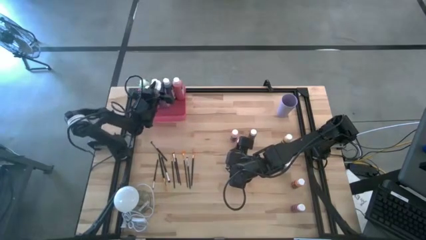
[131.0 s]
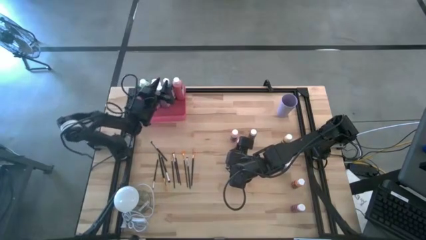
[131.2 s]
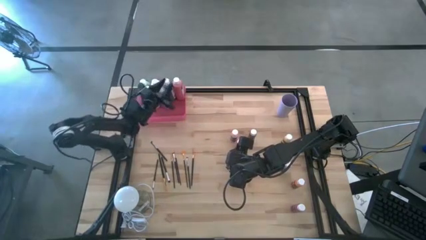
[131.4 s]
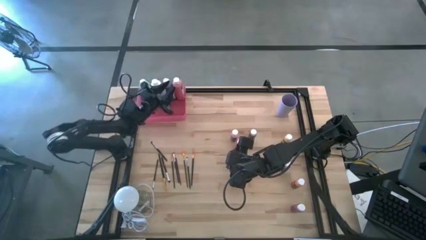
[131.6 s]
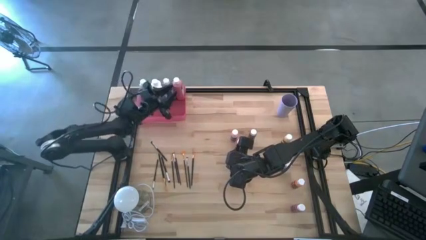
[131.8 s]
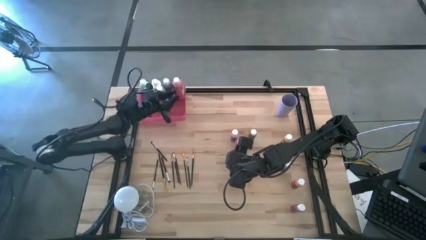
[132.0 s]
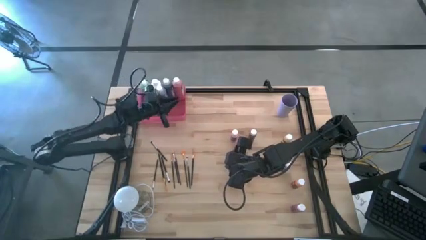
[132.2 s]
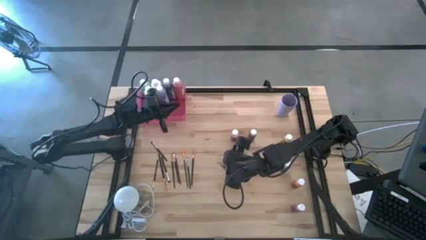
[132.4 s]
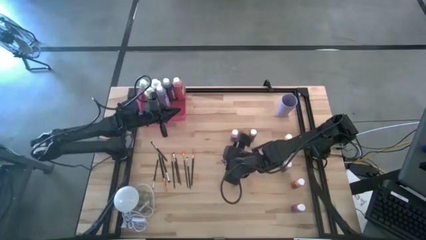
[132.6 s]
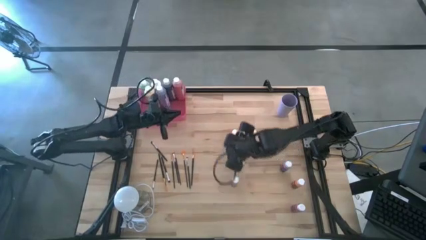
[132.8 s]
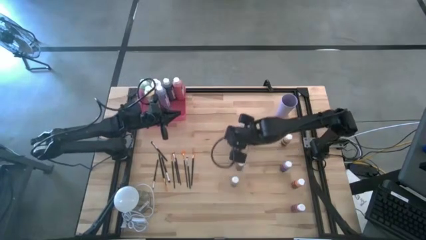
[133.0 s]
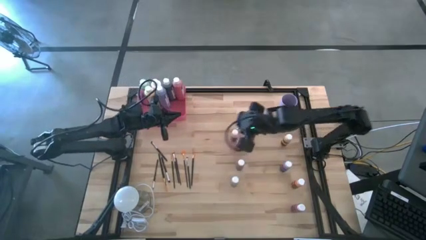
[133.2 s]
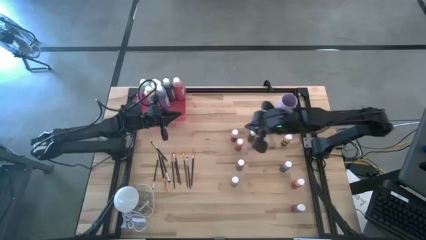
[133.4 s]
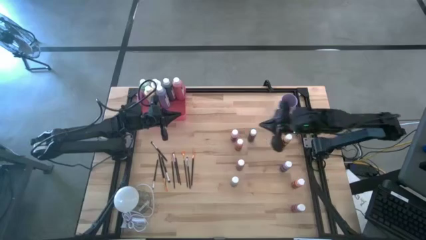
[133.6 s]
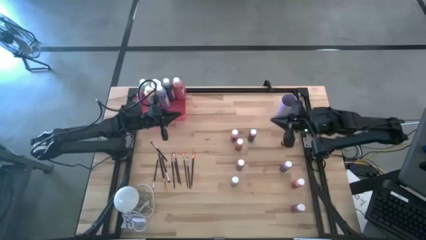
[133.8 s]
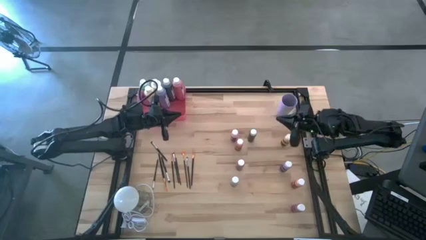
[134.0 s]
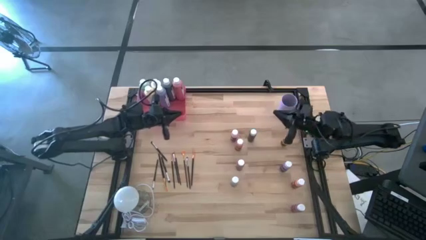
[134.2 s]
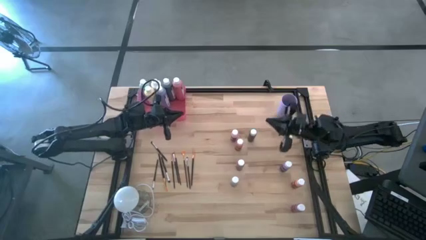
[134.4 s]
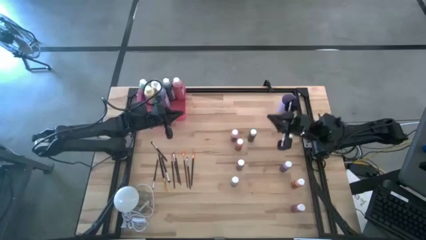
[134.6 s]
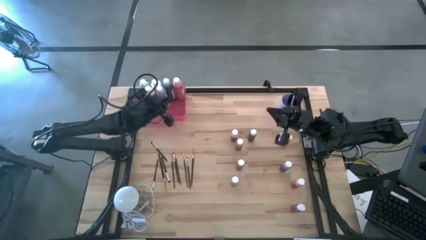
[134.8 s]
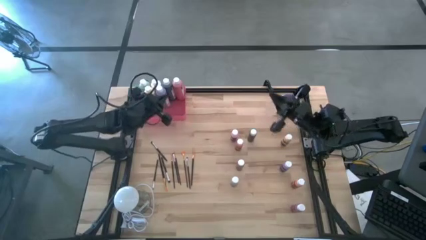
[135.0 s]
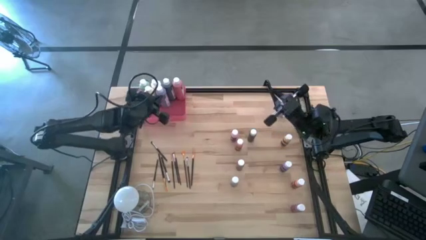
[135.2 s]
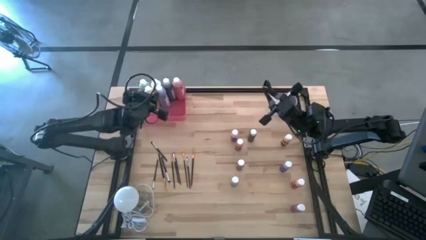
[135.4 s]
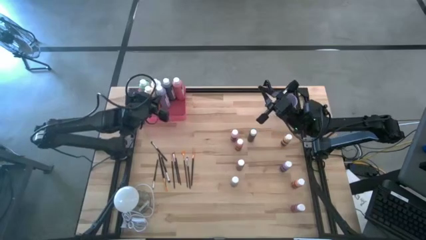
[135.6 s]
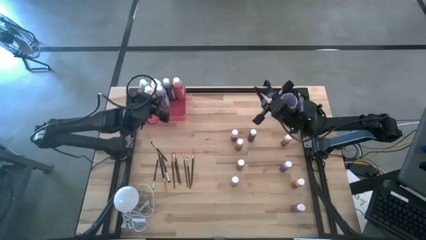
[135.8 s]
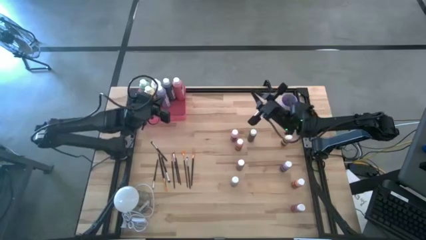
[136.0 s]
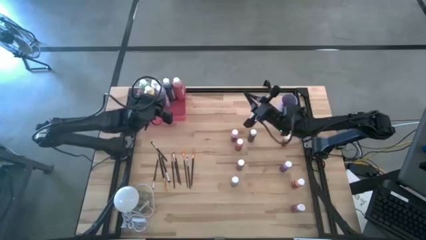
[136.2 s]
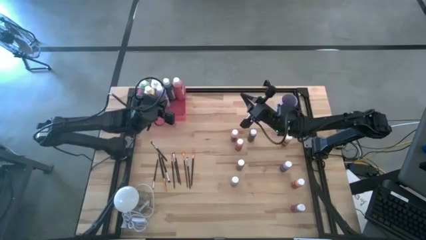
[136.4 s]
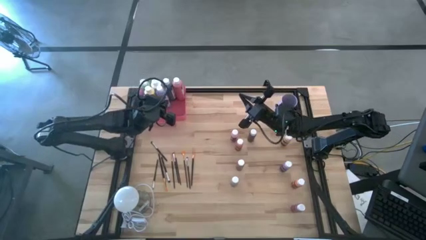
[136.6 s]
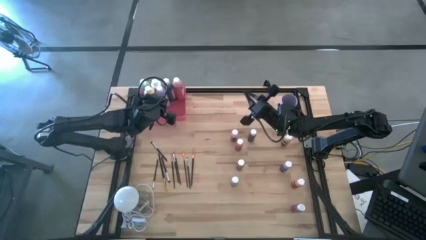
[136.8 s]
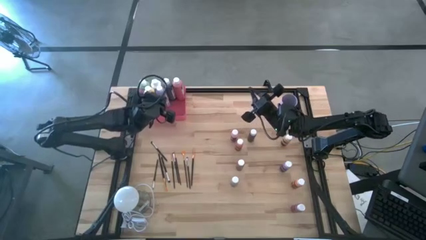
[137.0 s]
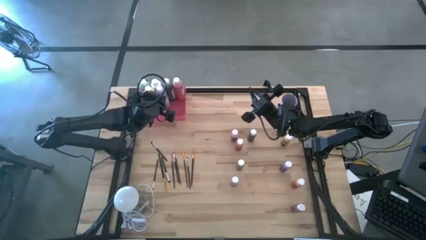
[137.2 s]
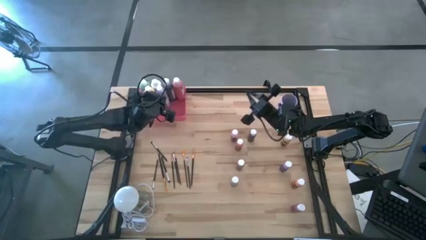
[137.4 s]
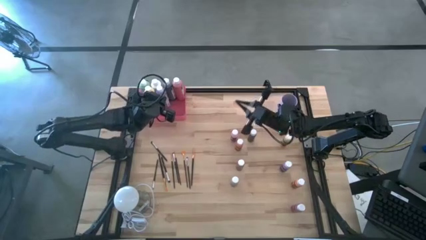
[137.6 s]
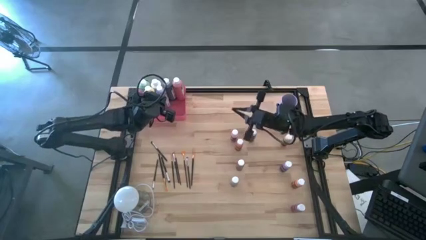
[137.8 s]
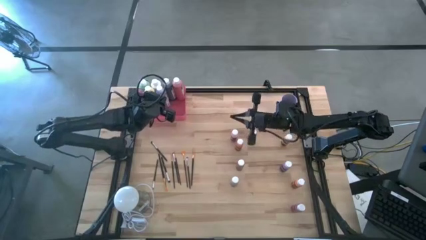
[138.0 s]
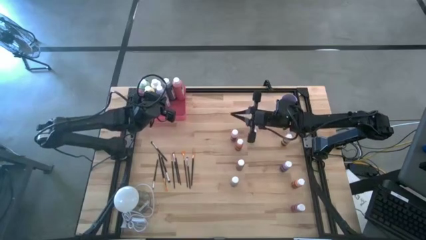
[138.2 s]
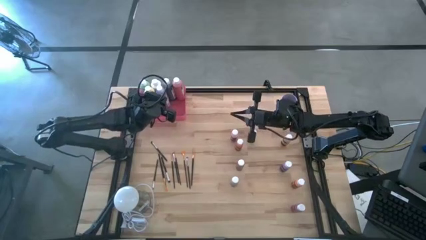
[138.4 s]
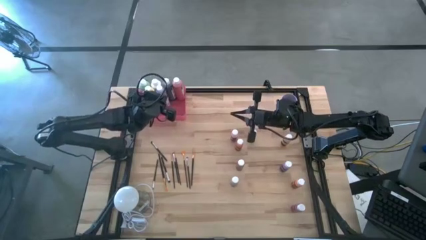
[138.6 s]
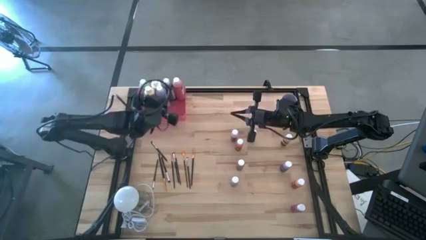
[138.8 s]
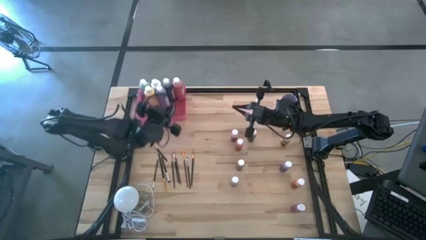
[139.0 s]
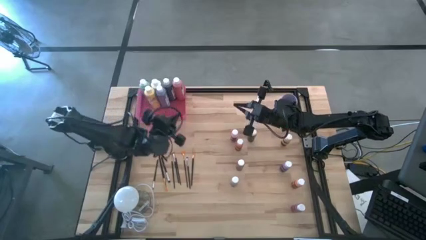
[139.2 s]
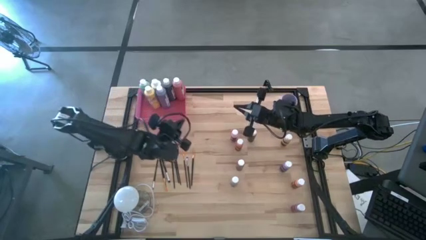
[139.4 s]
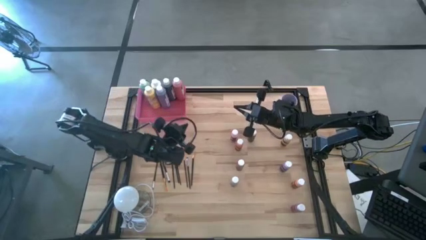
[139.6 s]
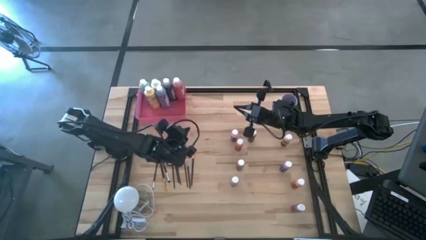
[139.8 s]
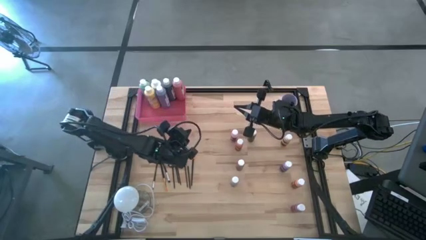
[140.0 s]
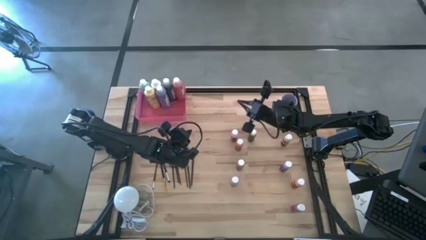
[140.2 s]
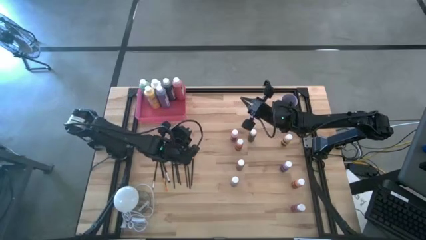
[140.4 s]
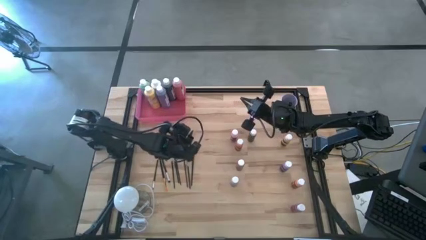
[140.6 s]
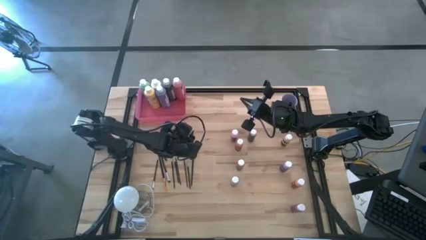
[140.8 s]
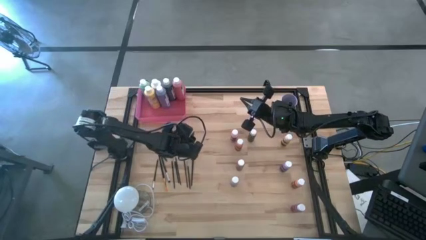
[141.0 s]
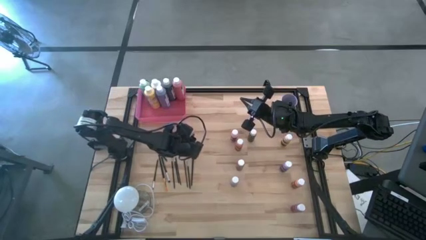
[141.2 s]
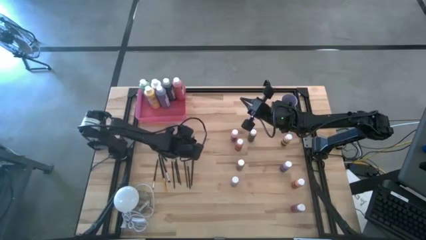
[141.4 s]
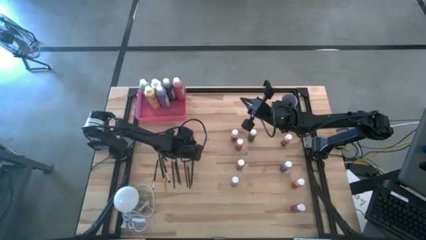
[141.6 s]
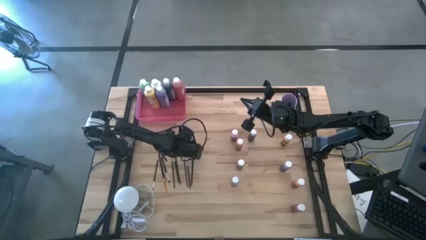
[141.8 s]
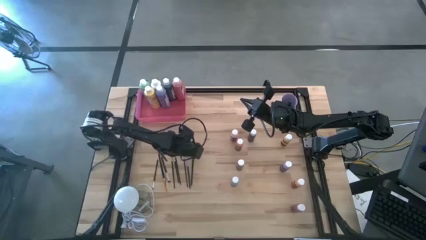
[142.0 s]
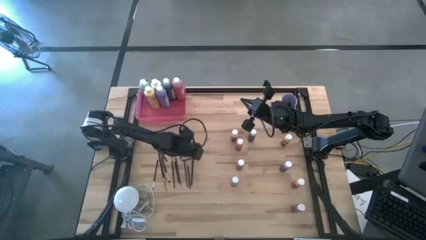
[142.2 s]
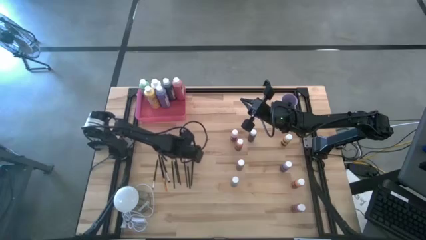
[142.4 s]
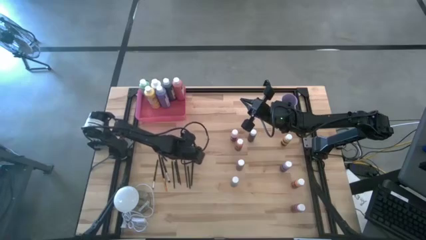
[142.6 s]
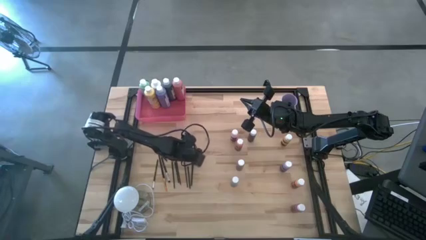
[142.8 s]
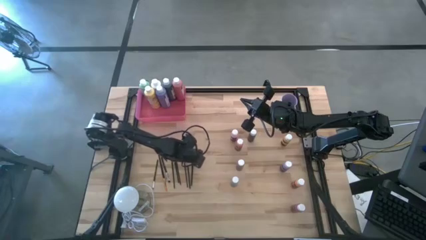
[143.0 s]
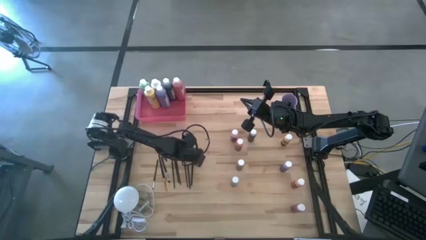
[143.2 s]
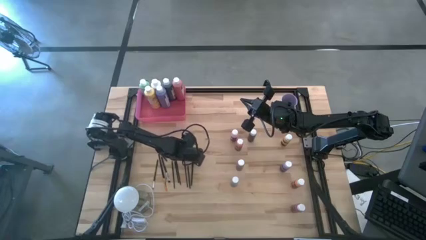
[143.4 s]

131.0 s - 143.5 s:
Task: Pick & Place Paint Supplies
Put the gold paint brush into the purple cup

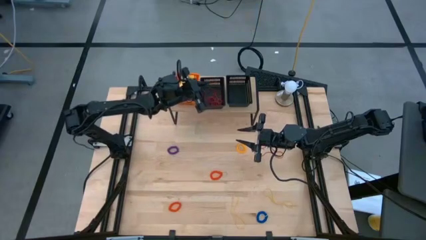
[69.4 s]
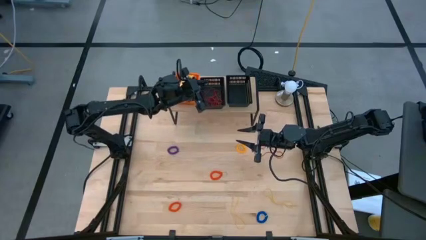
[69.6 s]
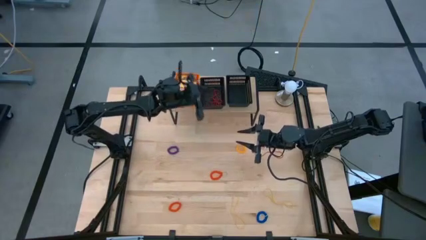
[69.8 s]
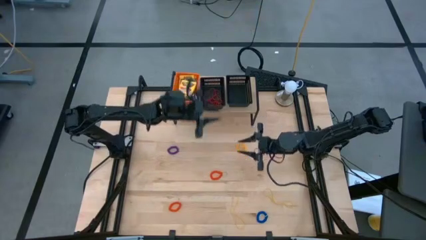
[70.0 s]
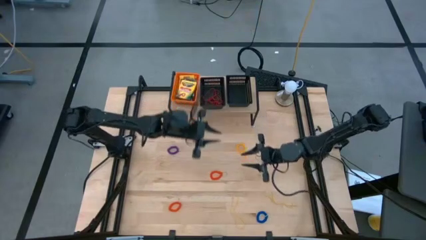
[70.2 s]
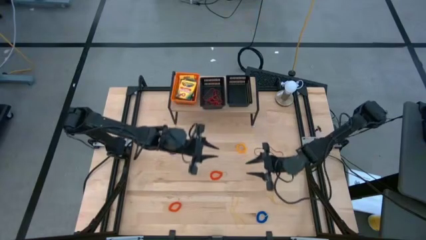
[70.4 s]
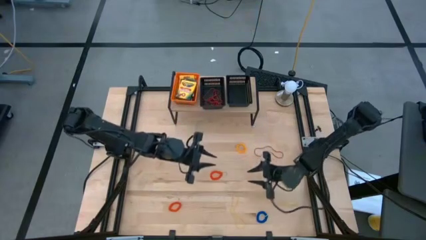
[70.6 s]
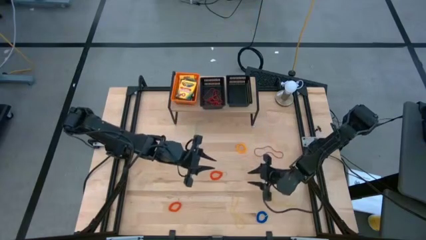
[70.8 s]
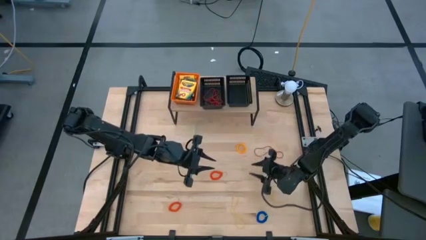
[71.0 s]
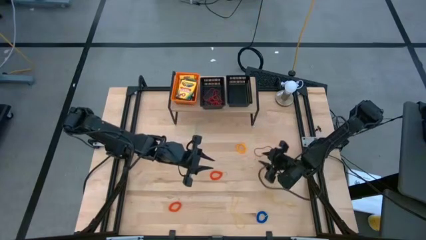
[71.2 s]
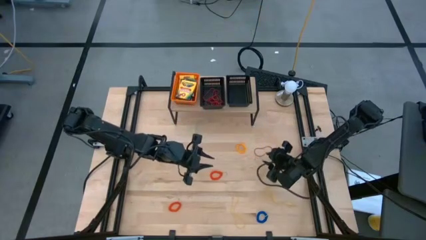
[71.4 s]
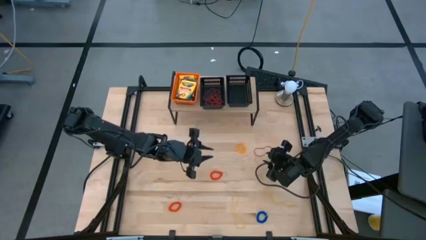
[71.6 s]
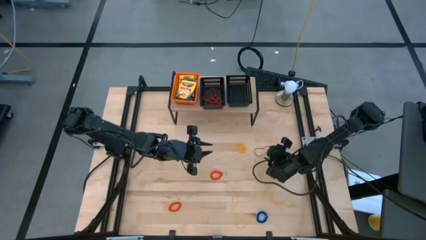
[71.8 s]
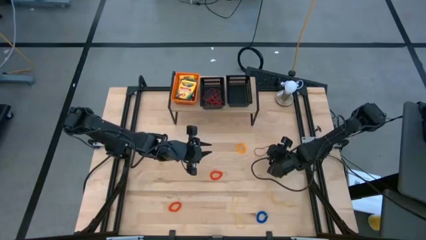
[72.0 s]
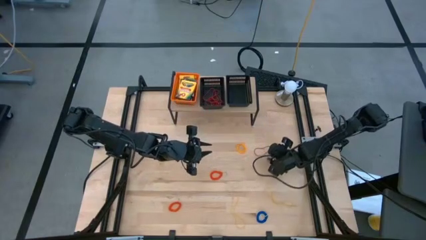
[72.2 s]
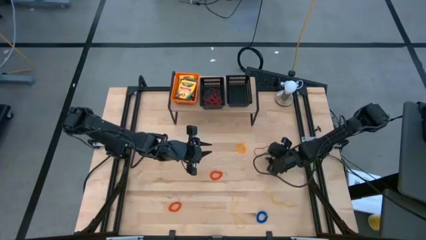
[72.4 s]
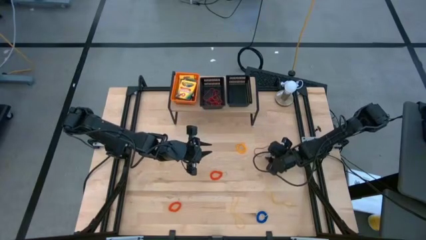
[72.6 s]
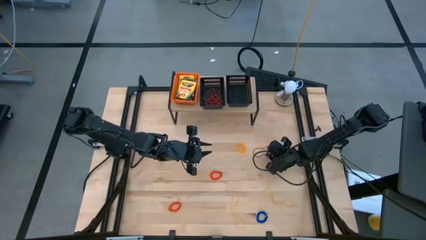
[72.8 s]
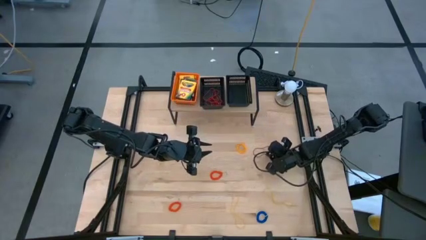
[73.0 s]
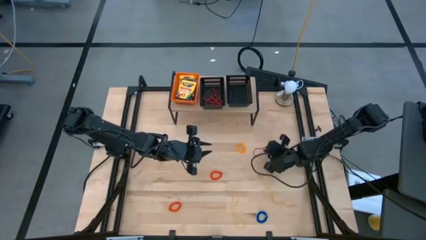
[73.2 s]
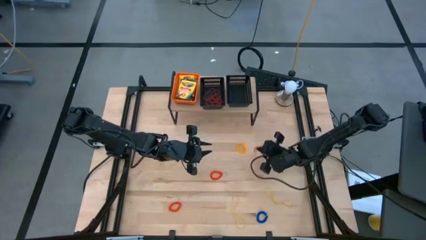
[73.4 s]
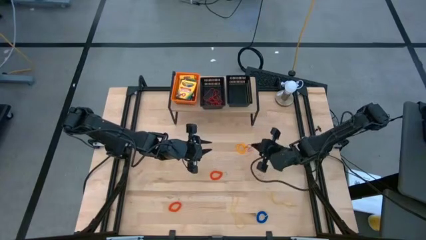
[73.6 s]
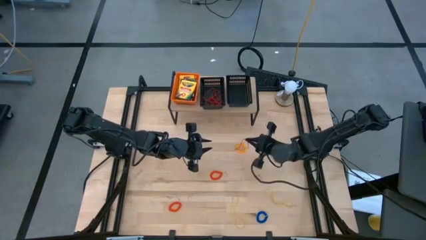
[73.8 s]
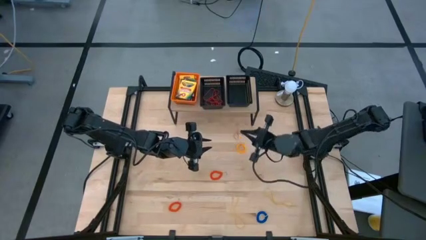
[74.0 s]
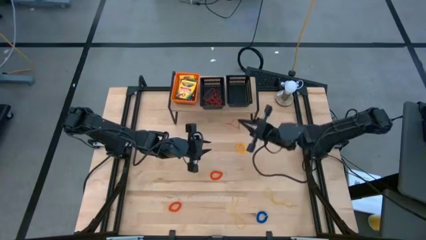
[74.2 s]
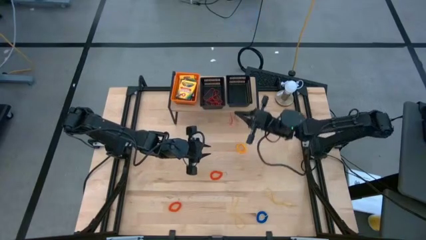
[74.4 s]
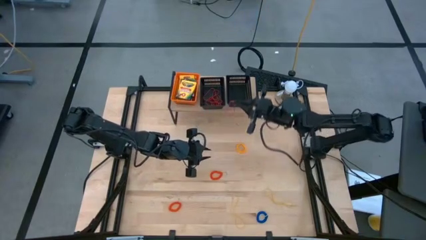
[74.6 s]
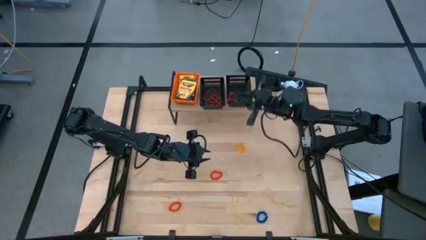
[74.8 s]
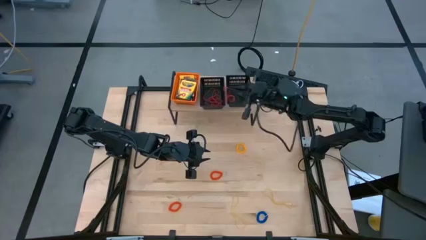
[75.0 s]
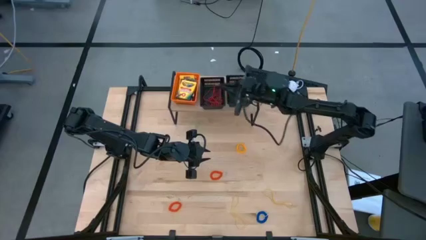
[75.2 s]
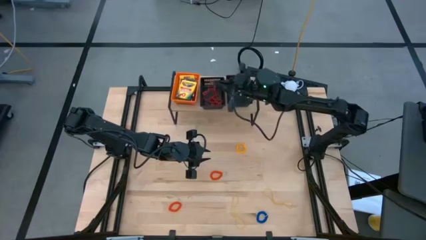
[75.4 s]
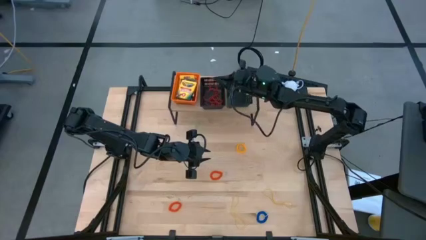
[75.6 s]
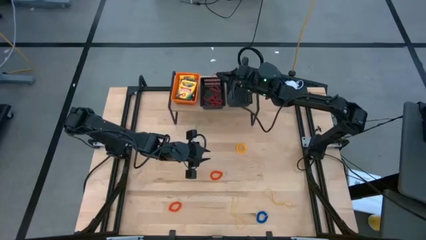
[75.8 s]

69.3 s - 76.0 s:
Task: Pick & Place Office Desk Supplies
Put the red rubber band into the left black basket on the shelf
